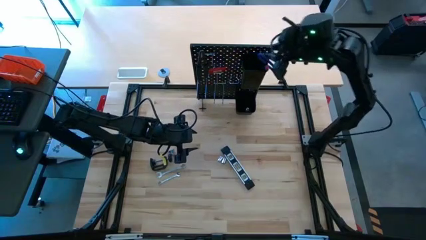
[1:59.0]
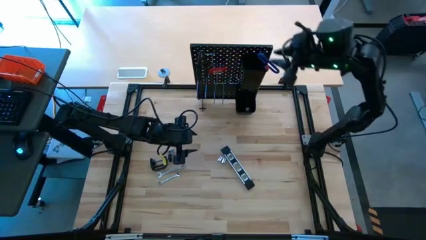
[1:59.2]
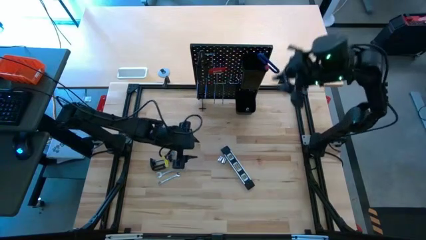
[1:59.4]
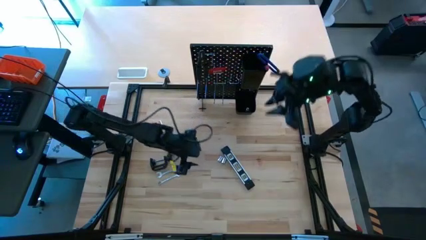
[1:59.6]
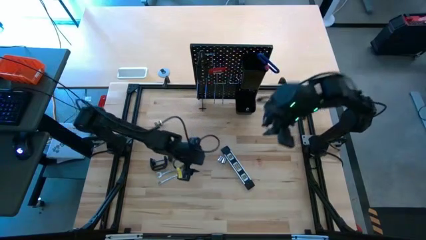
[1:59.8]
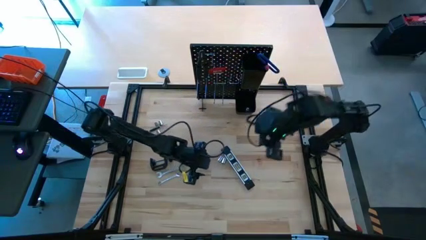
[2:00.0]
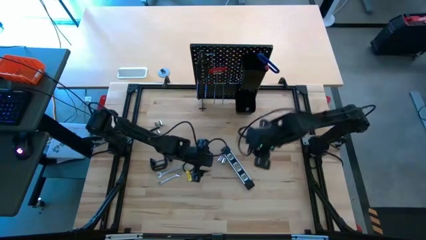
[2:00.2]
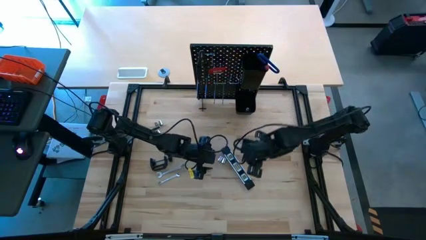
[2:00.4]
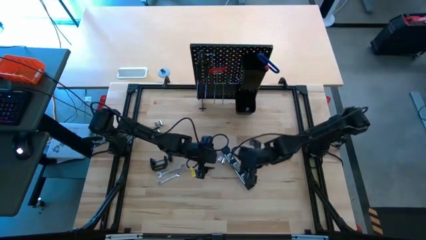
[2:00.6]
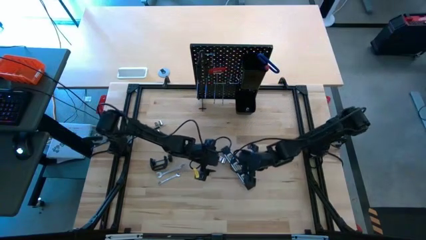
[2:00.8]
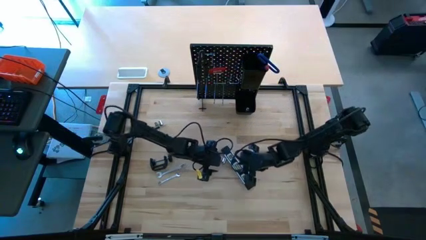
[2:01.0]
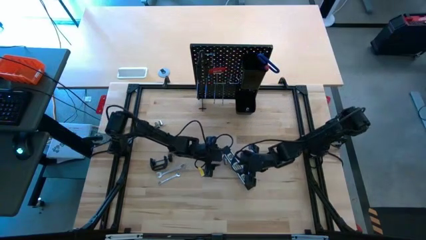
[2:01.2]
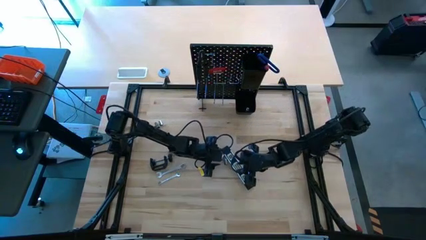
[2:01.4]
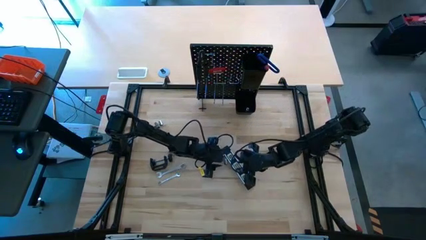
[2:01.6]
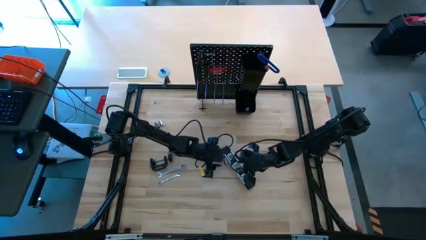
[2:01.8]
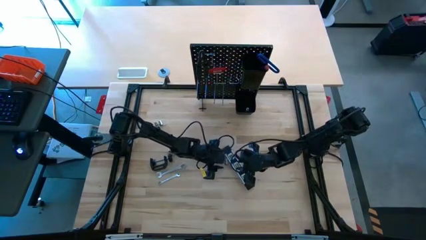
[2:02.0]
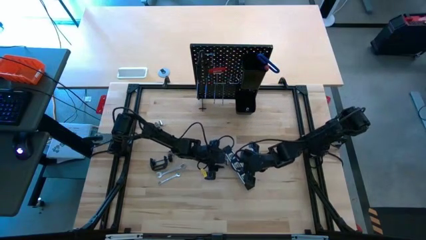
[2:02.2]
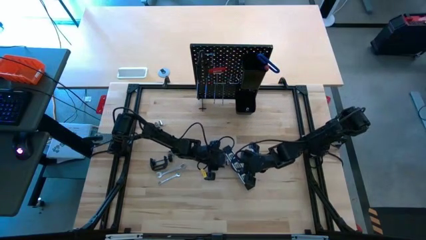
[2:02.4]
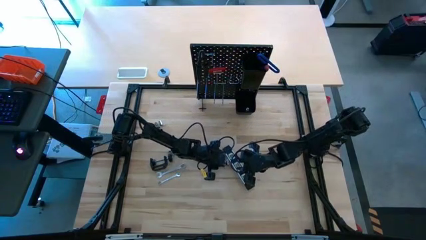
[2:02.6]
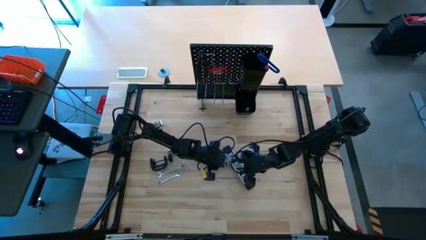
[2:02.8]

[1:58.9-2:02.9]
Task: Hang tools onto peg board
Put the socket into the bottom black bin on the peg board

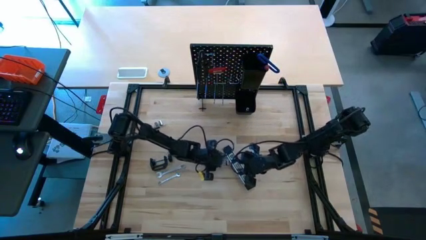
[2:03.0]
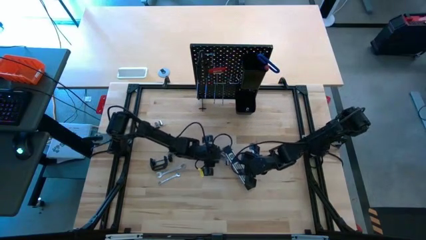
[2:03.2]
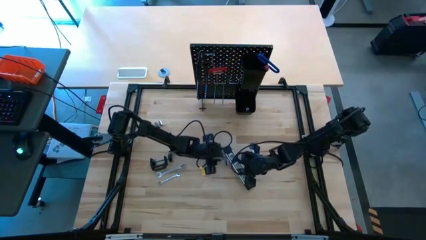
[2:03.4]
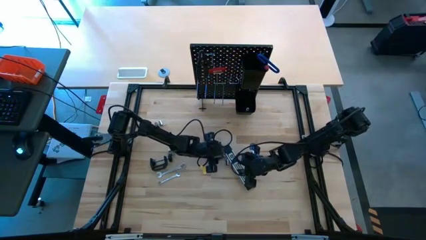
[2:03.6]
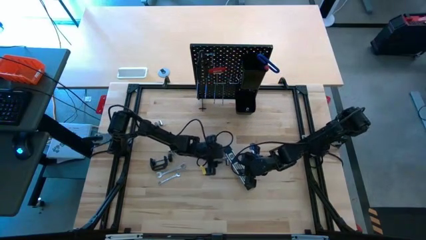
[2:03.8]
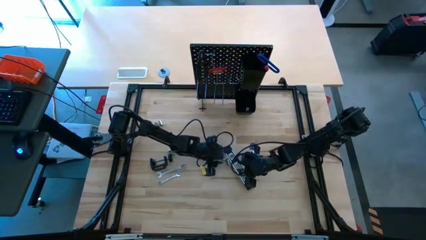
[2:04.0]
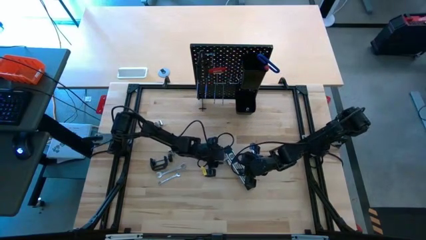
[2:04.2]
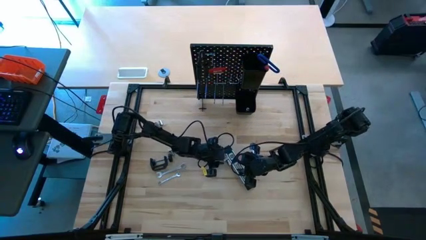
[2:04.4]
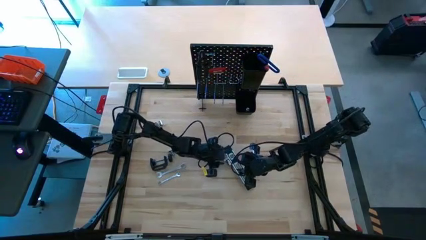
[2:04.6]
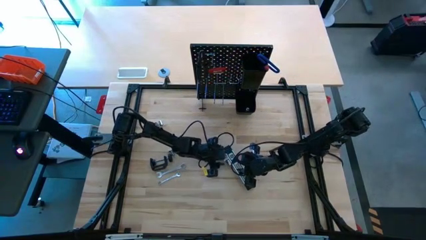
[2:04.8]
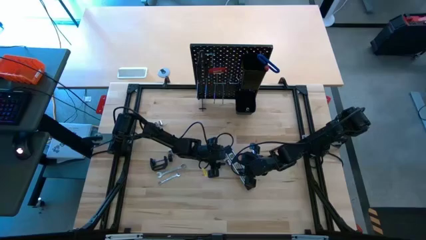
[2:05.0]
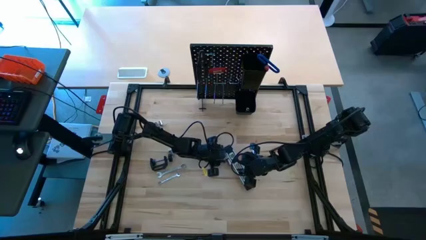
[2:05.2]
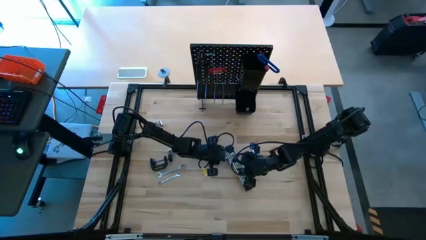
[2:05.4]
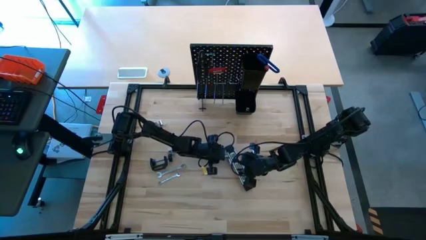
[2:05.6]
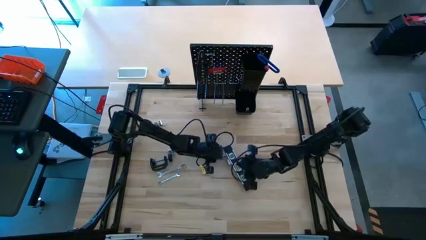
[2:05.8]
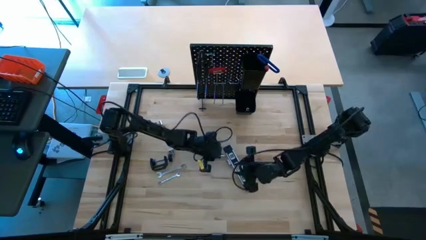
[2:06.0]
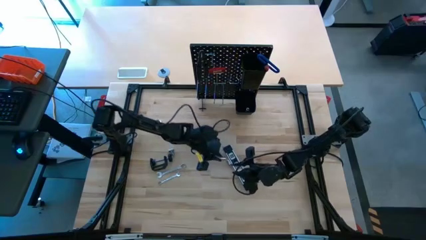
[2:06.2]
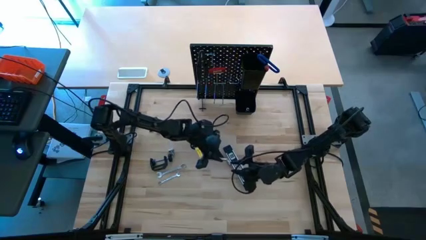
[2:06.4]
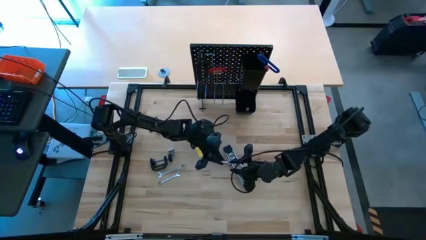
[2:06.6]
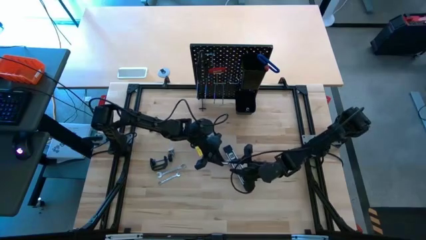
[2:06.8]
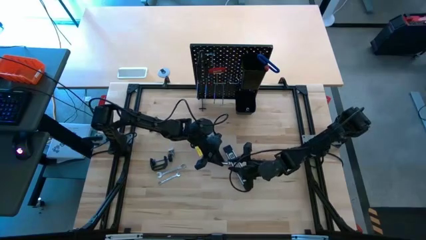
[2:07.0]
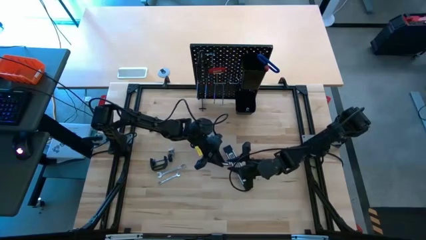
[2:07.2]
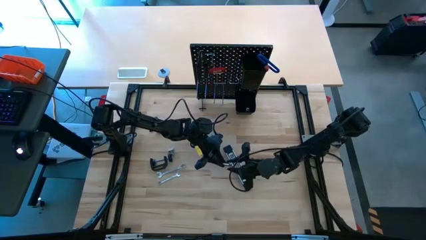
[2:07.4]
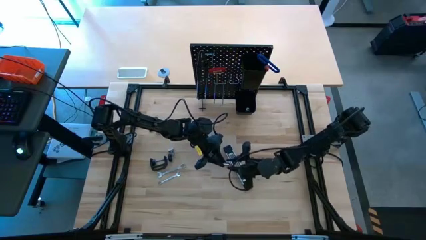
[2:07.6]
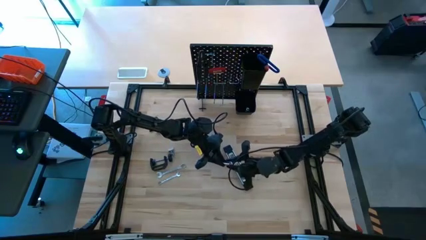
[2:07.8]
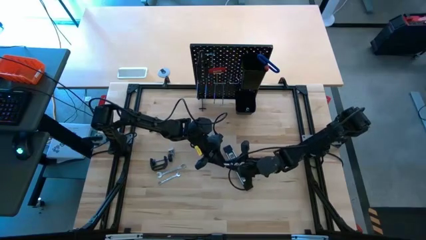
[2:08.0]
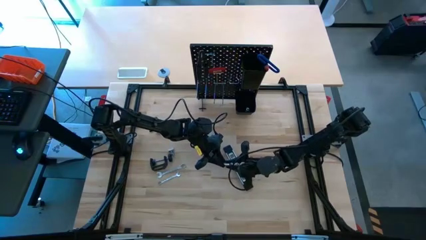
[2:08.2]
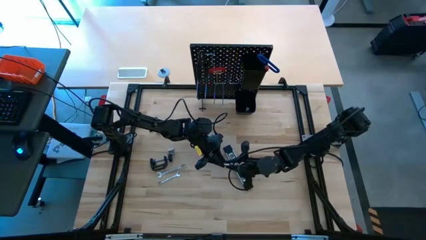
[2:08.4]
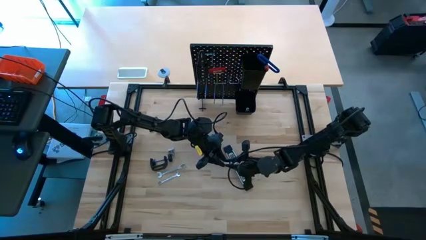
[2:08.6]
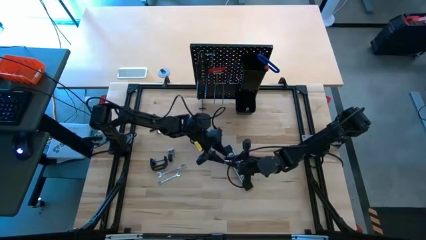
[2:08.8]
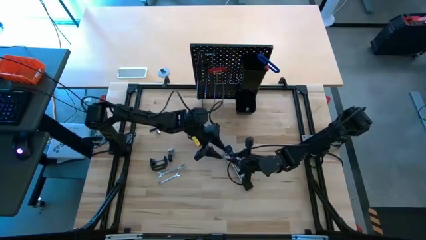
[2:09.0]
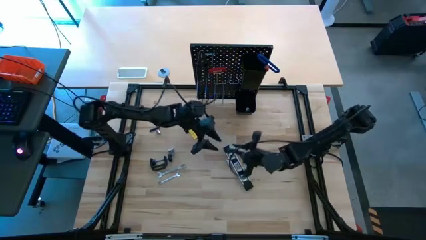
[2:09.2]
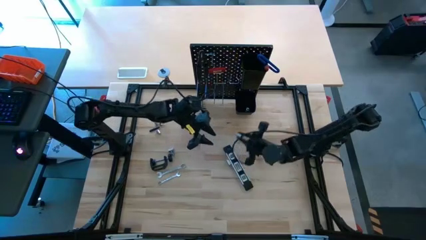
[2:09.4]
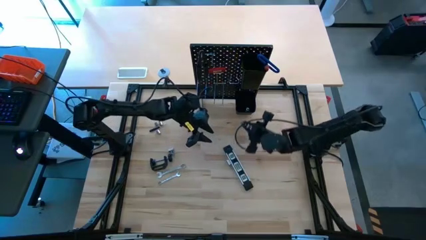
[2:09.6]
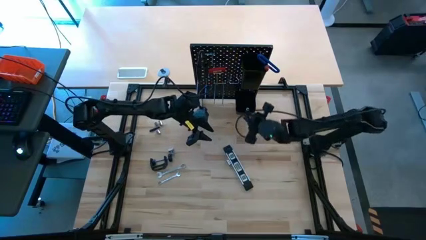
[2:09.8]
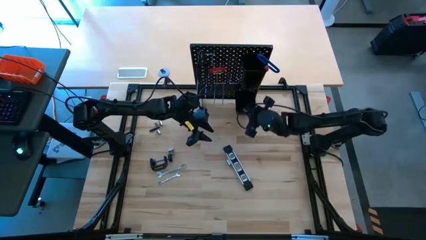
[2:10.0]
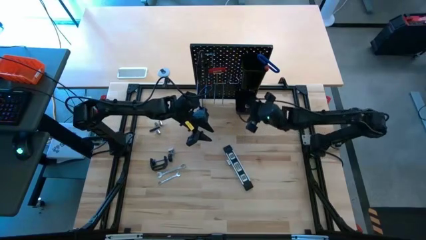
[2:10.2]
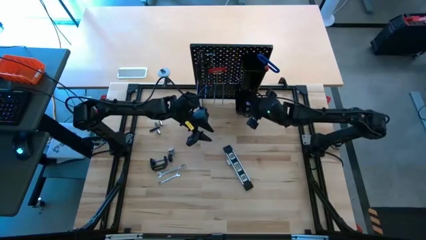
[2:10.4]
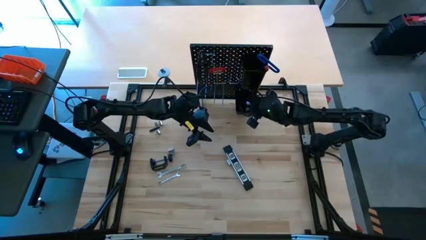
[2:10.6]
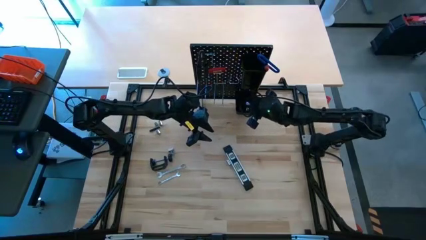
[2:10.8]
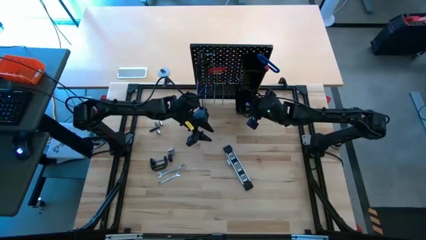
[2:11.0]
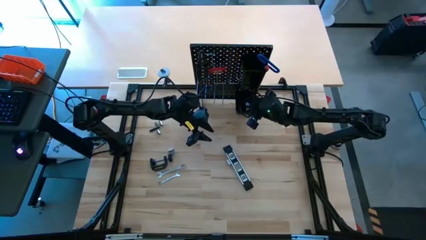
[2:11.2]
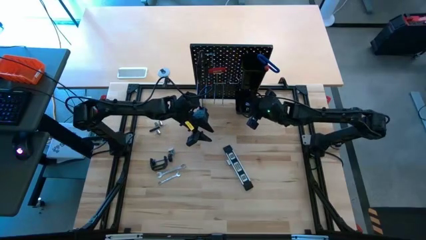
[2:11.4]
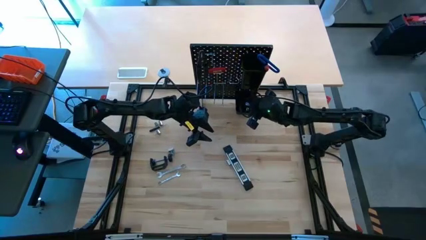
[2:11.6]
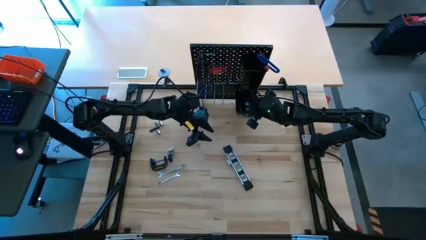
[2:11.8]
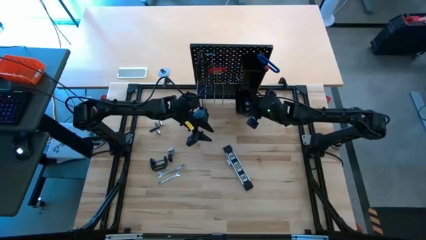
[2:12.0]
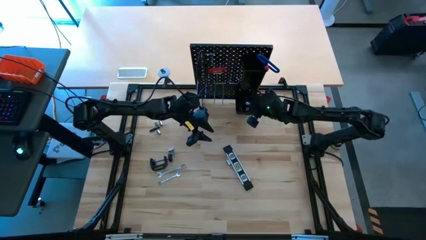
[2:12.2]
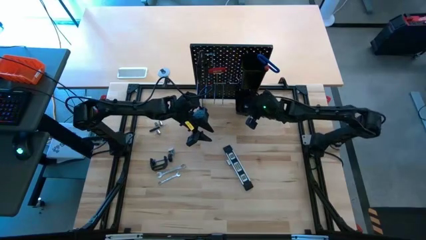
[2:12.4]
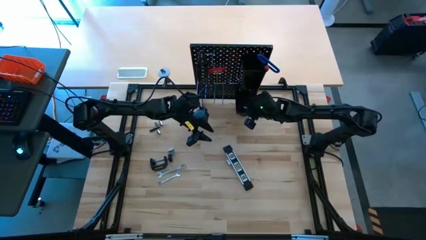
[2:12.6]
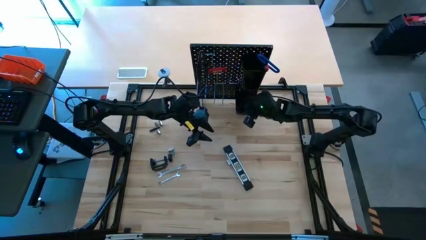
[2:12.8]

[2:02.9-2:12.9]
Put the socket into the bottom black bin on the peg board
